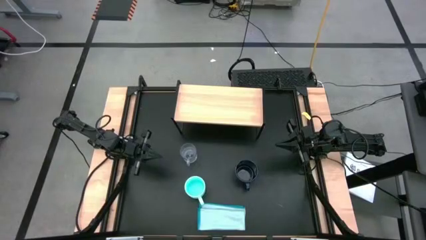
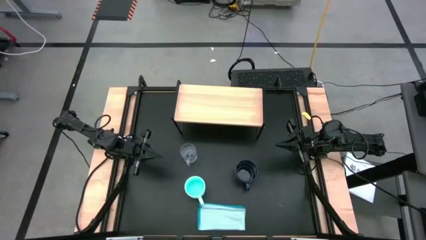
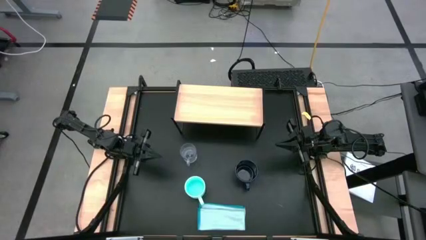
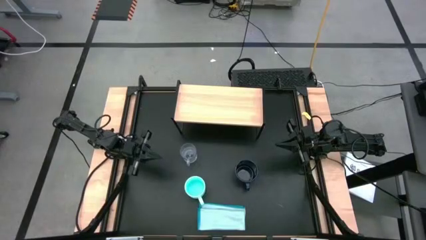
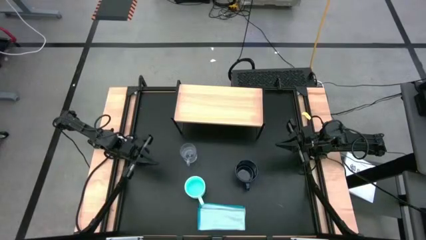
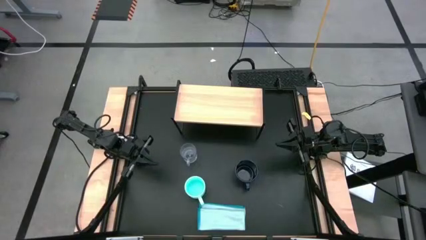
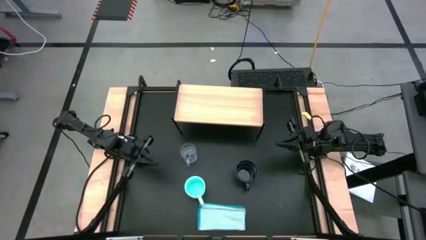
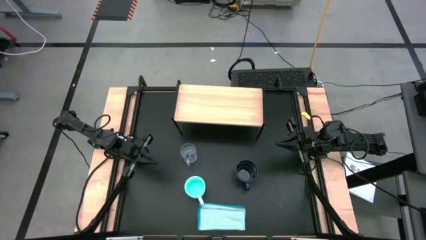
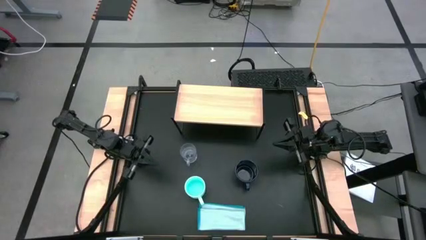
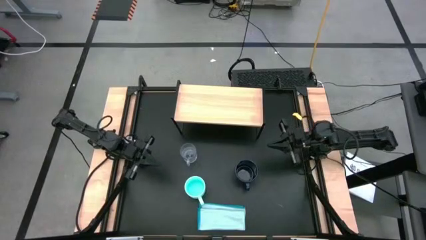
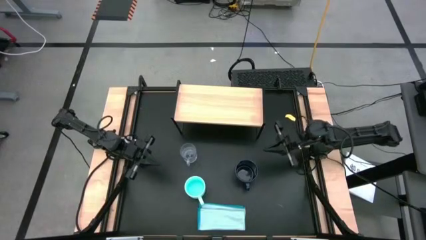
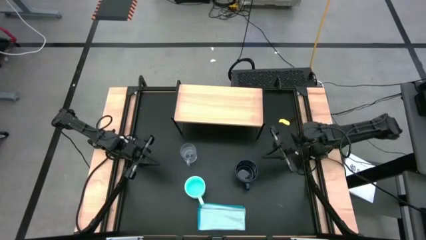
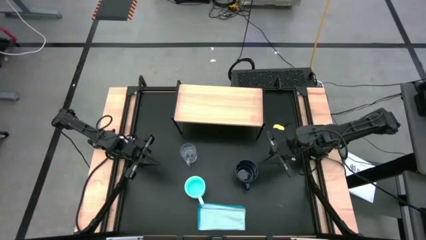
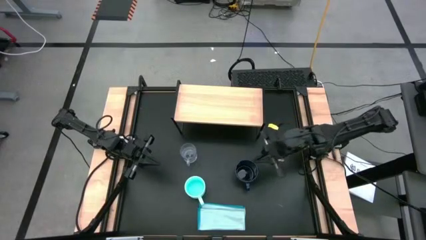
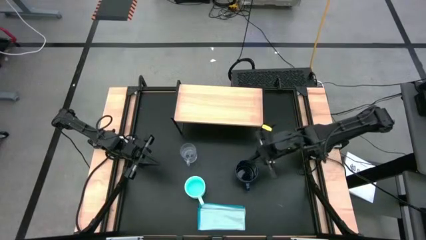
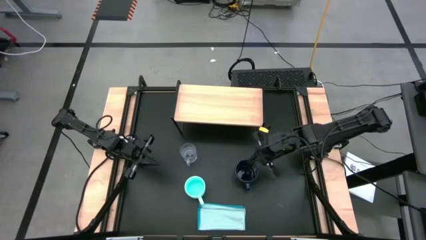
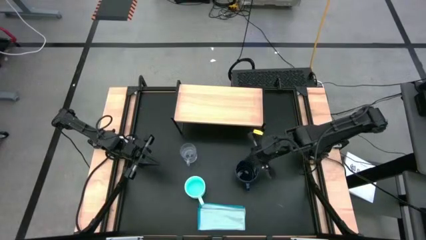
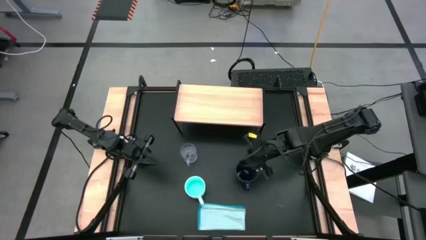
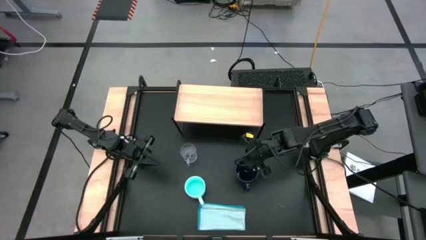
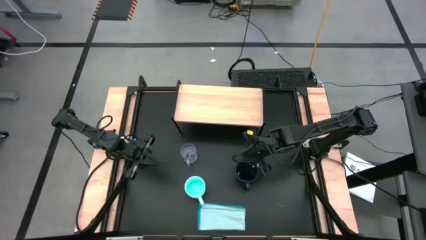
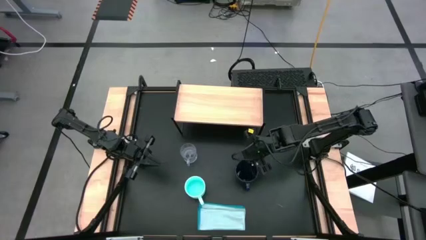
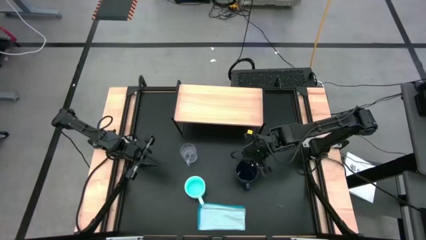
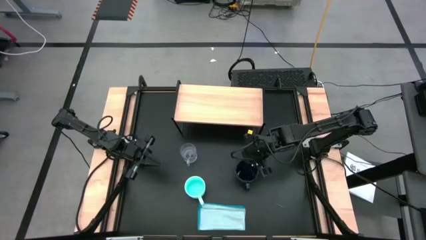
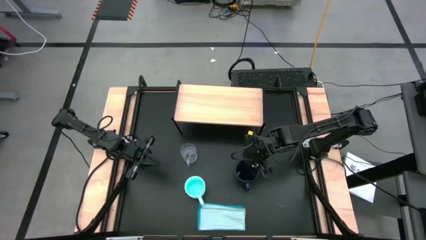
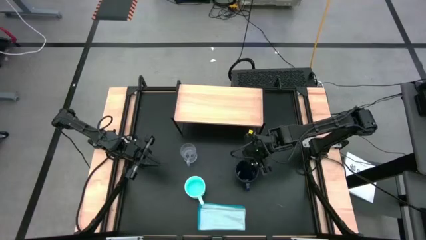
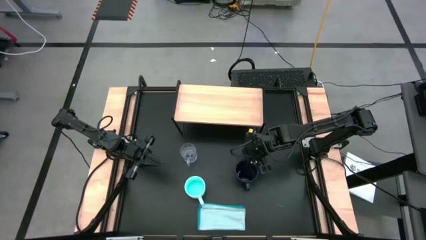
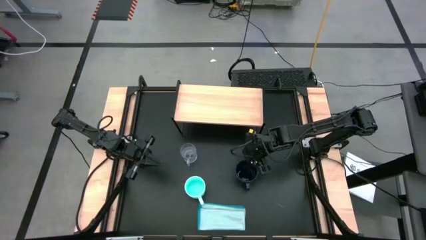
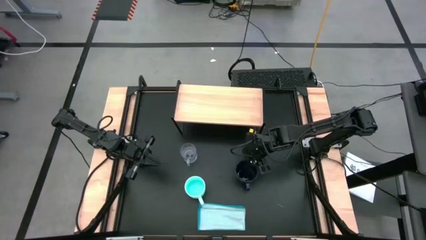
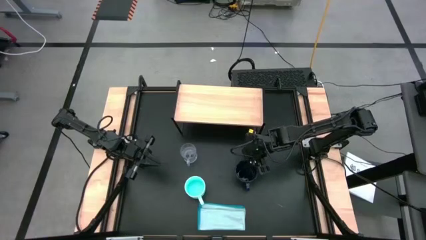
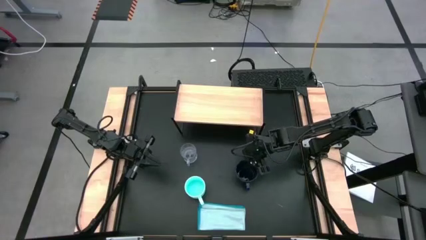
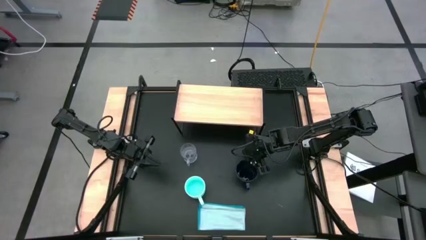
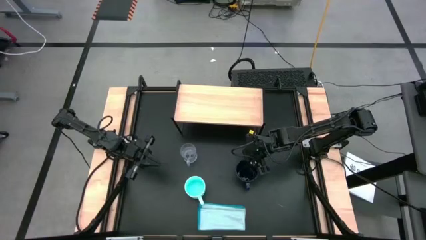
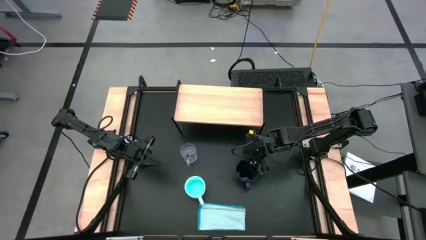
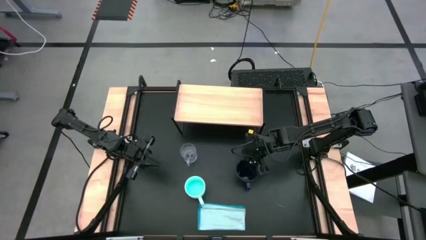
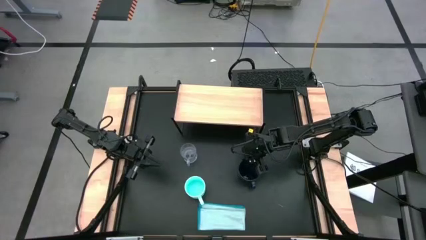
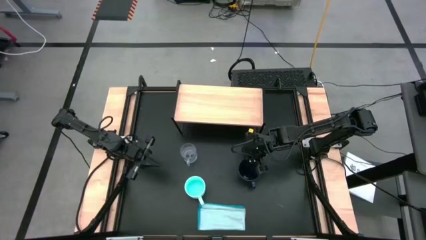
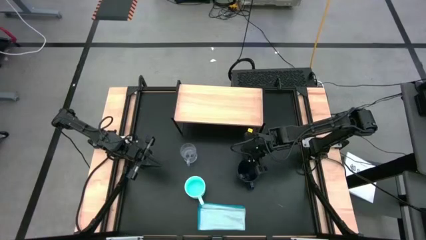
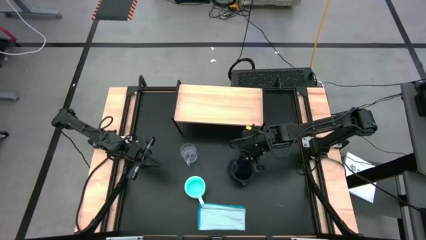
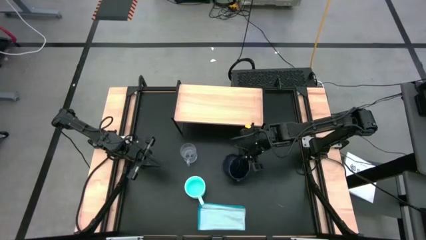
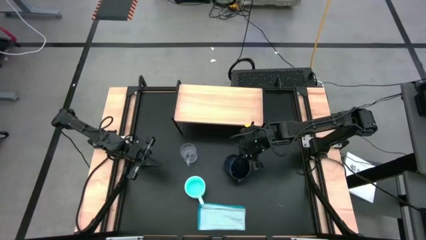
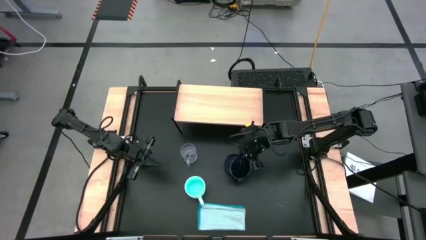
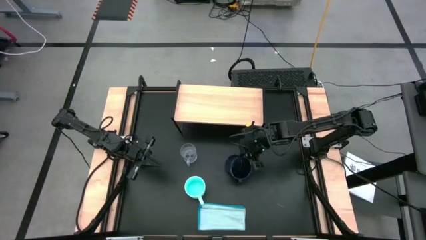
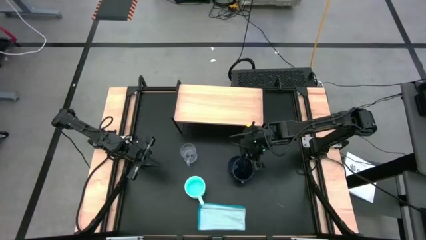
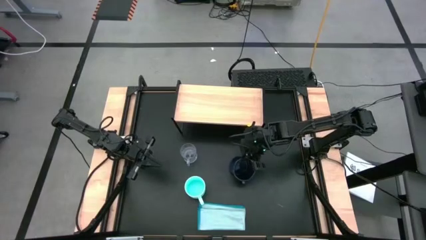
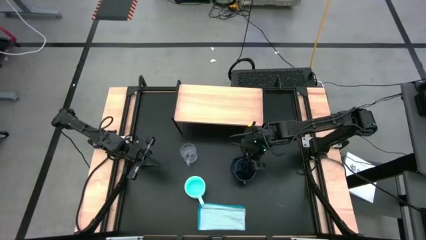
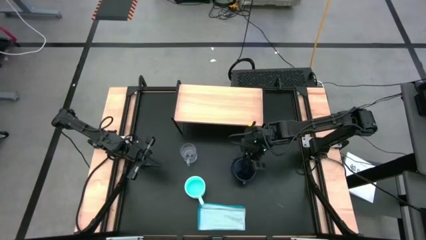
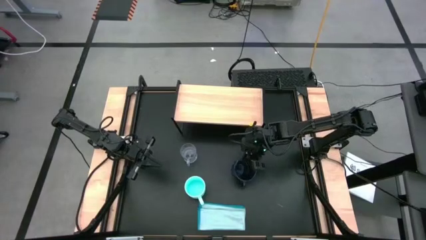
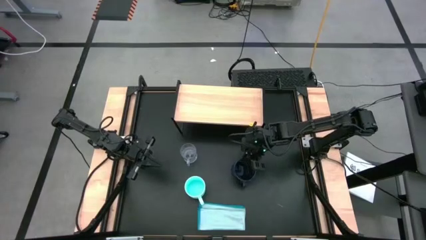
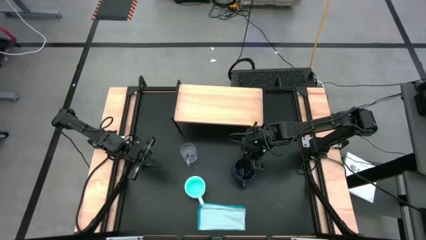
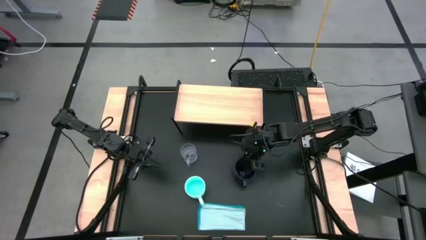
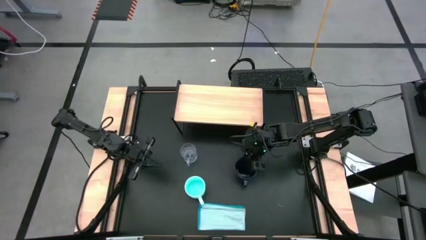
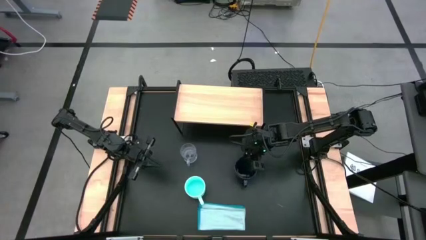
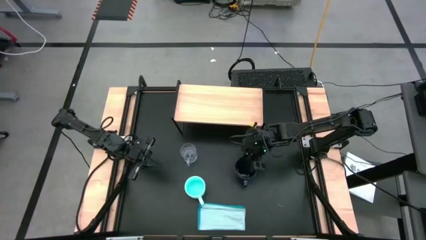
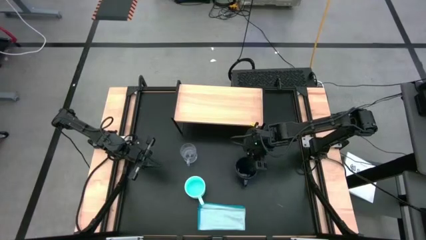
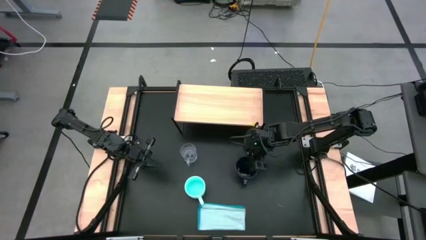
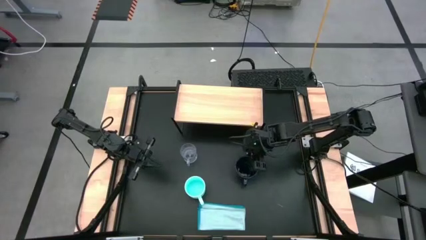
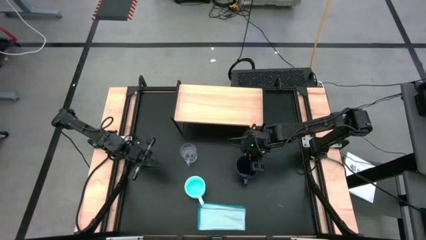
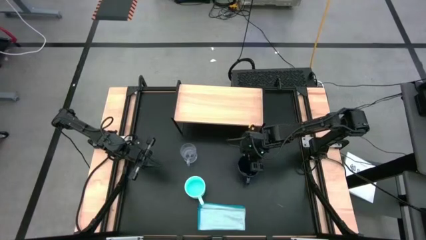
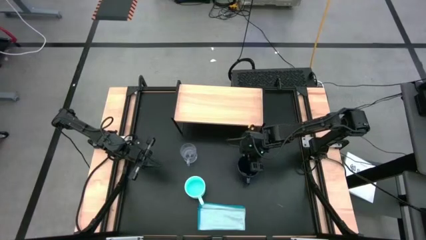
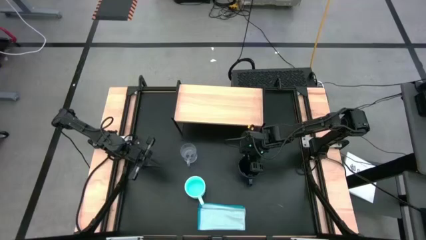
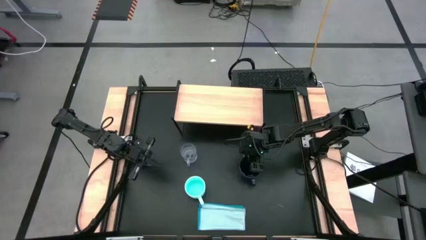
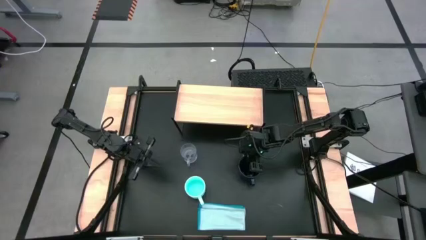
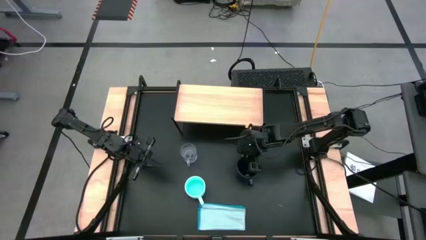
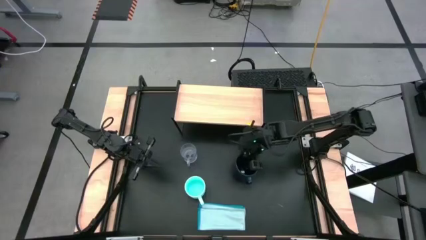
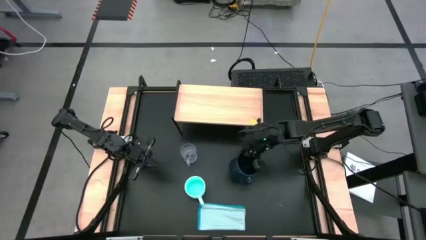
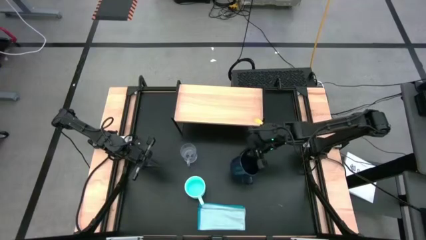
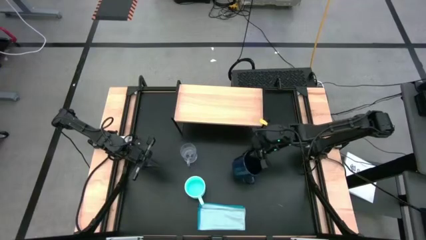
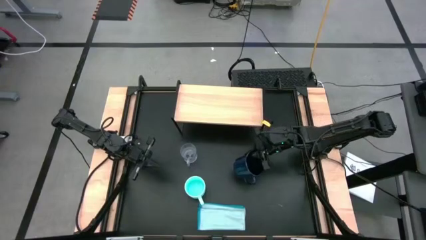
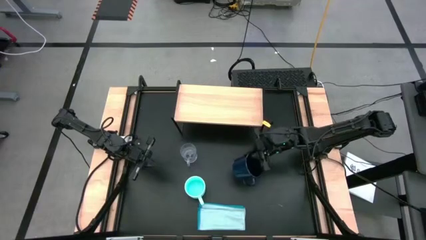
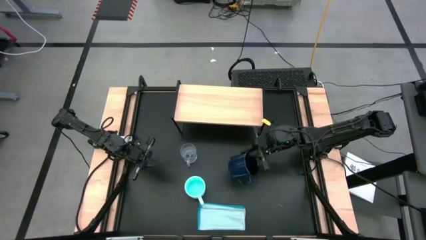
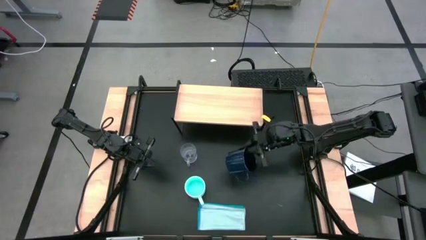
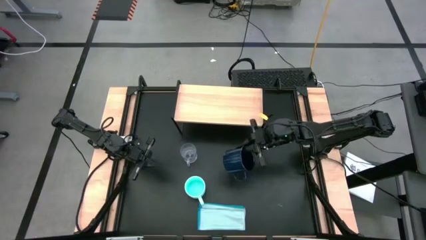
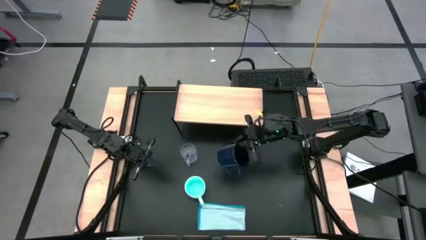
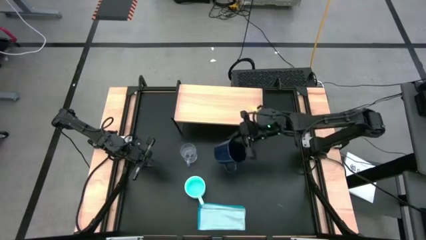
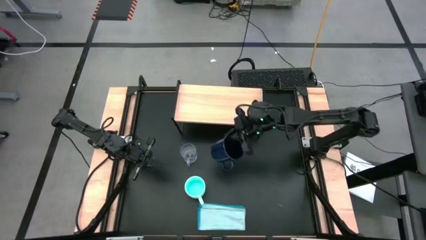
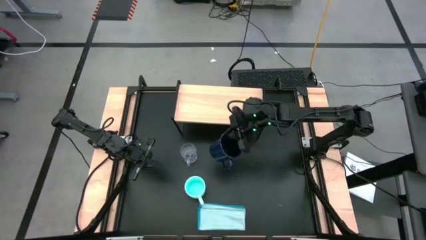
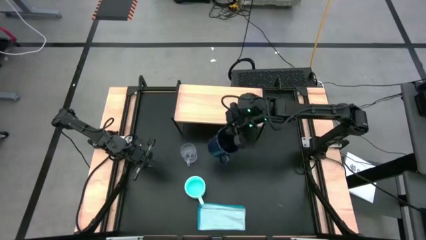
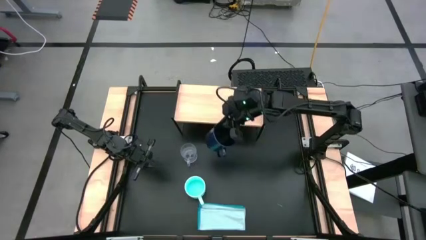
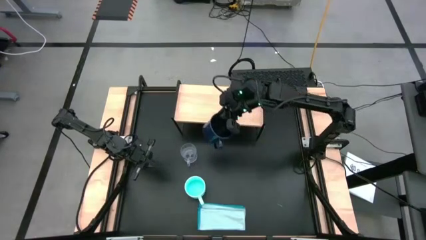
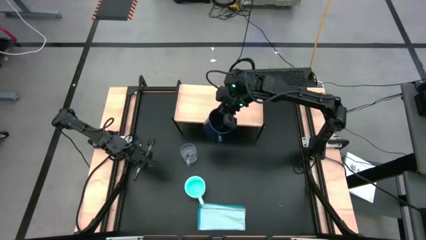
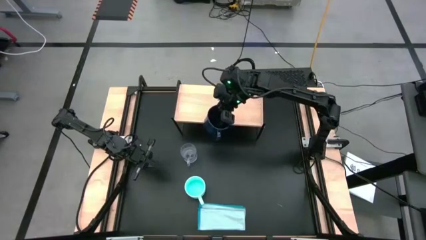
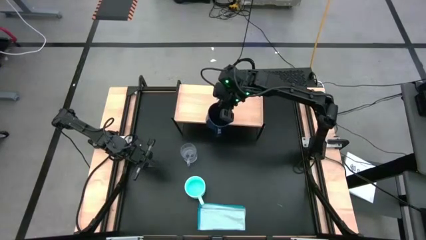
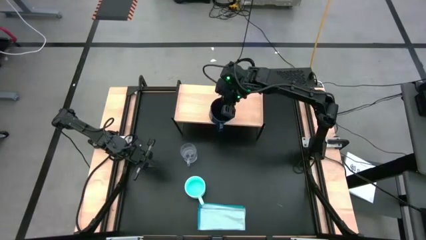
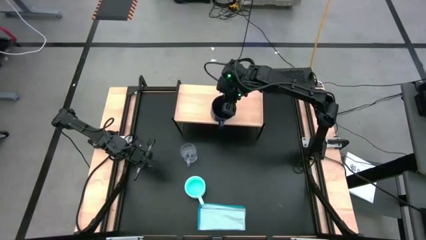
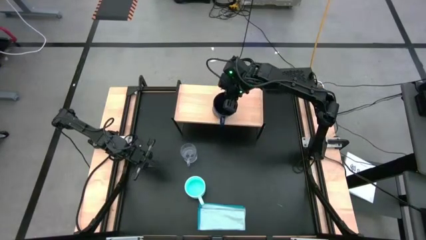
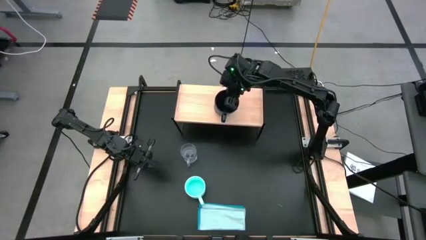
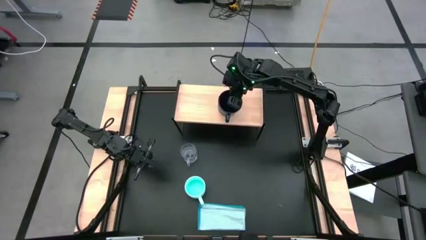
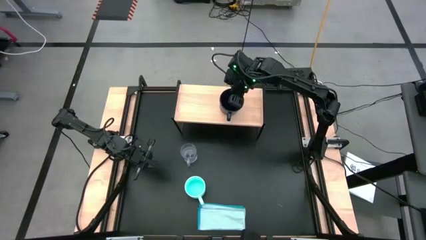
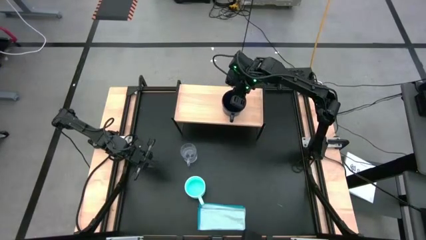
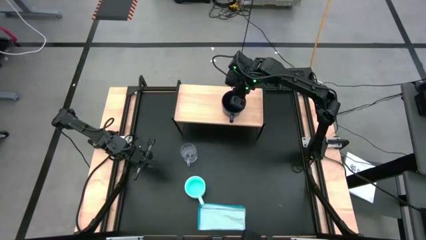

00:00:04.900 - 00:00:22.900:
Task: Stack small to large cups/mugs on shelf
Put the dark blue mug on the shelf
